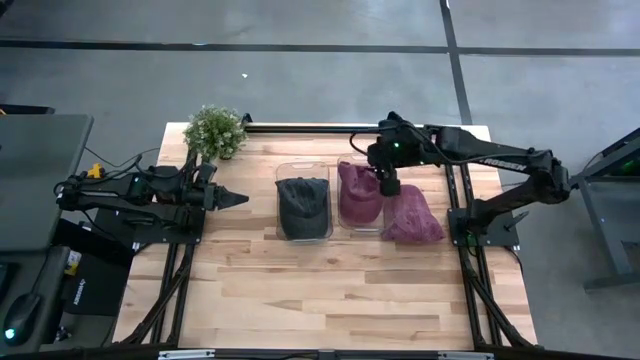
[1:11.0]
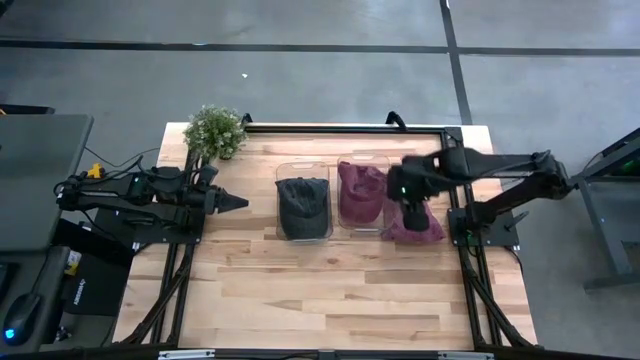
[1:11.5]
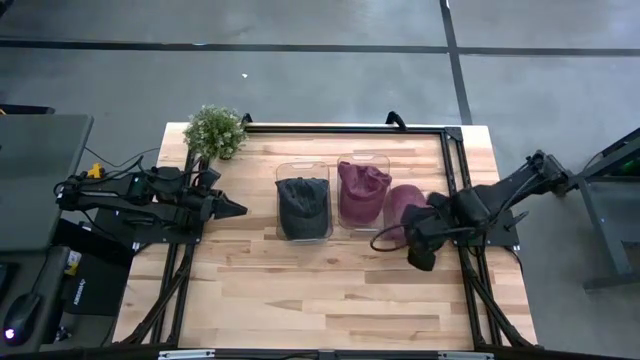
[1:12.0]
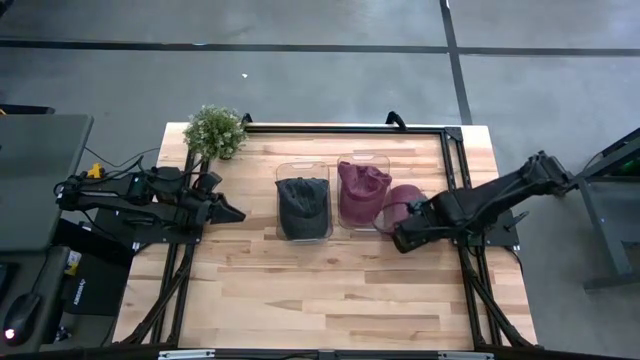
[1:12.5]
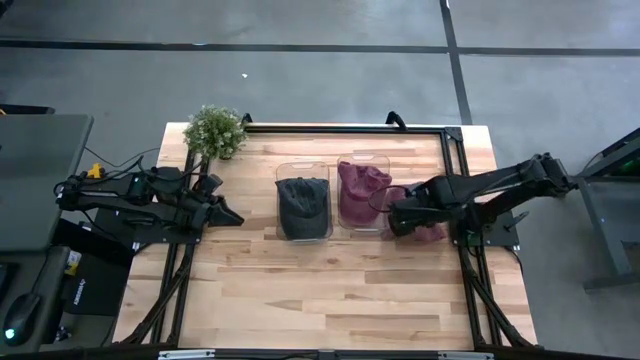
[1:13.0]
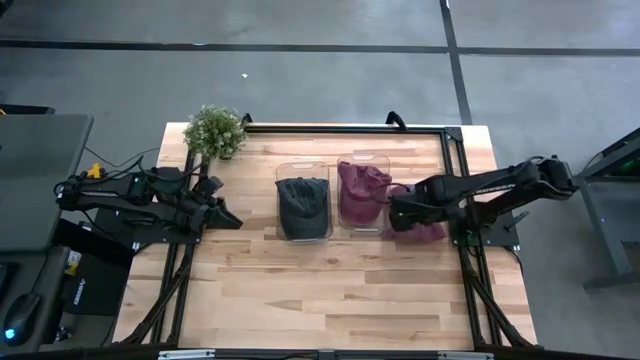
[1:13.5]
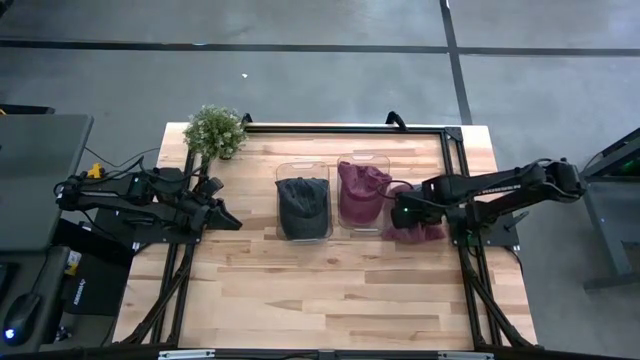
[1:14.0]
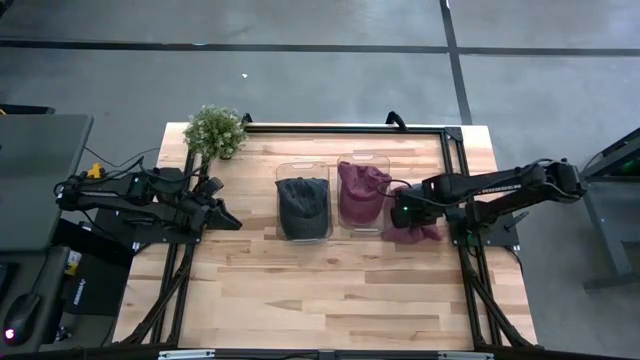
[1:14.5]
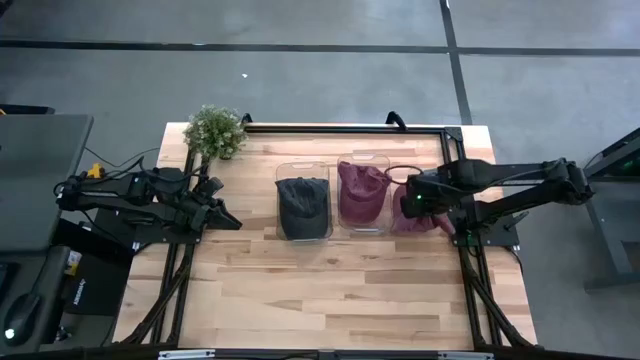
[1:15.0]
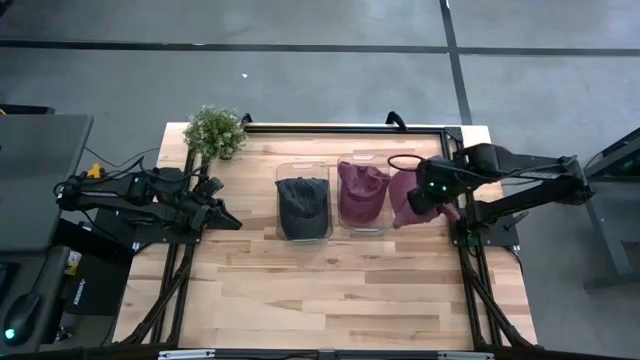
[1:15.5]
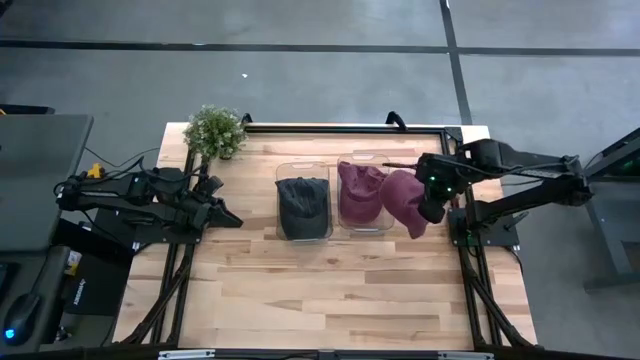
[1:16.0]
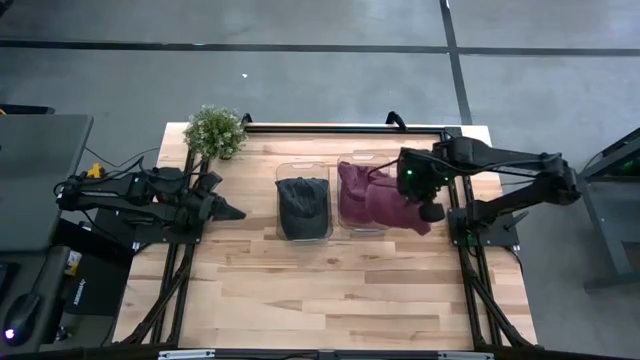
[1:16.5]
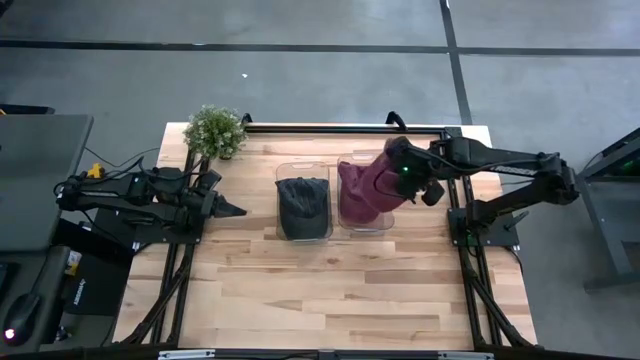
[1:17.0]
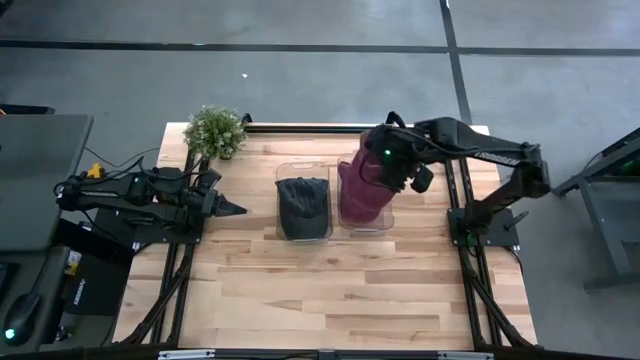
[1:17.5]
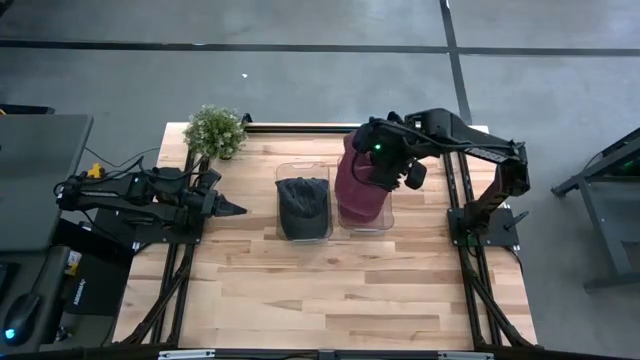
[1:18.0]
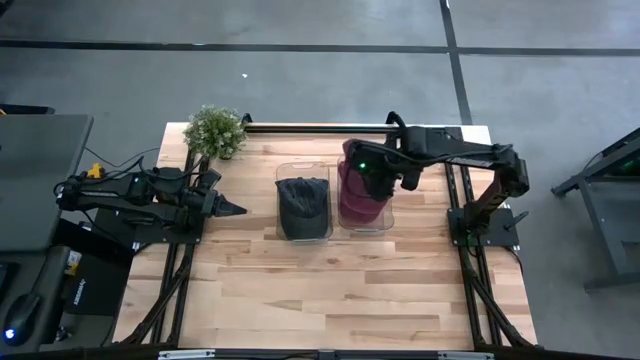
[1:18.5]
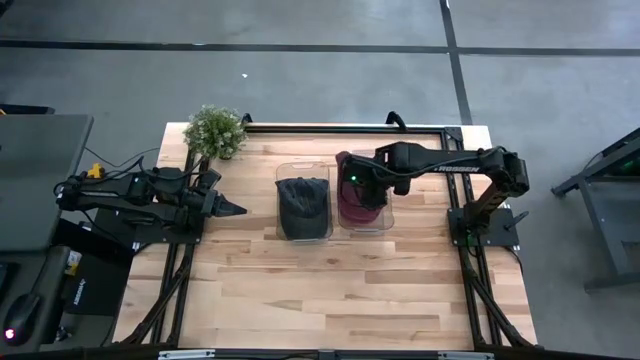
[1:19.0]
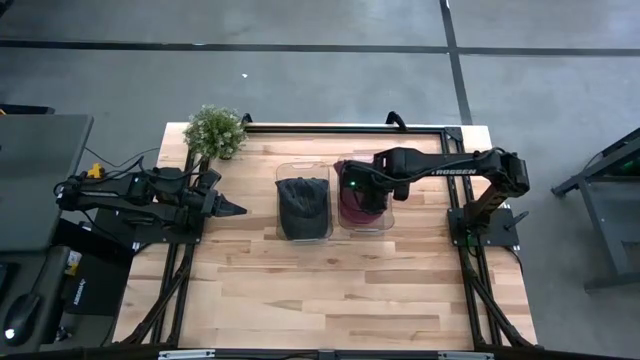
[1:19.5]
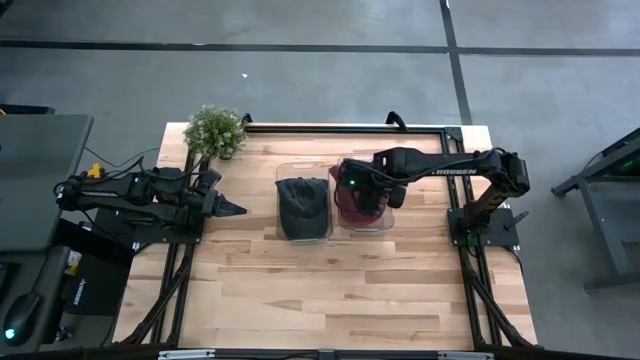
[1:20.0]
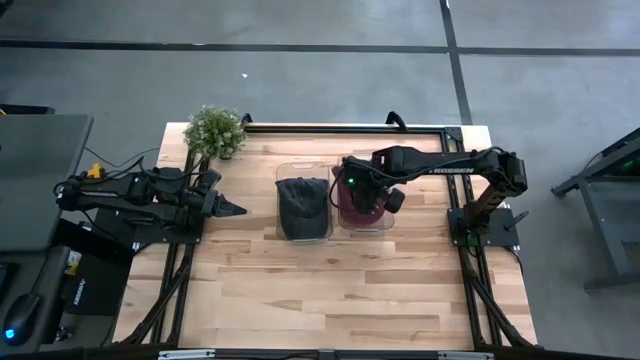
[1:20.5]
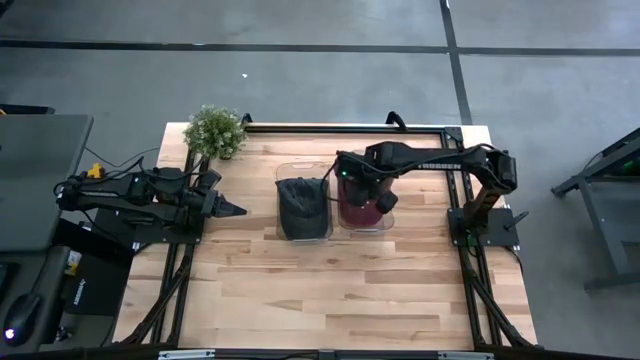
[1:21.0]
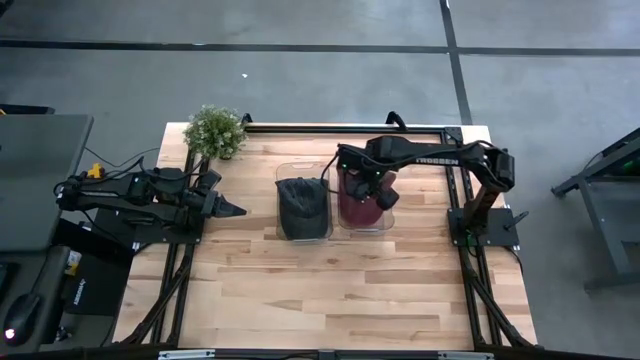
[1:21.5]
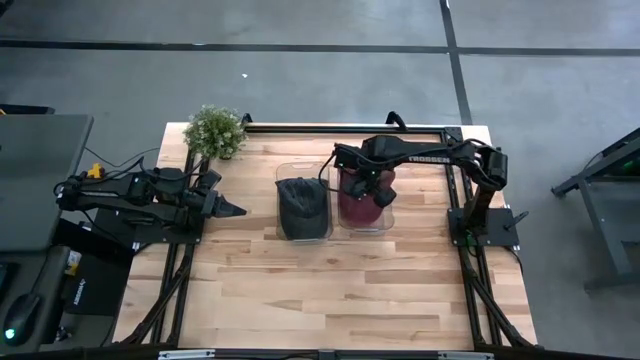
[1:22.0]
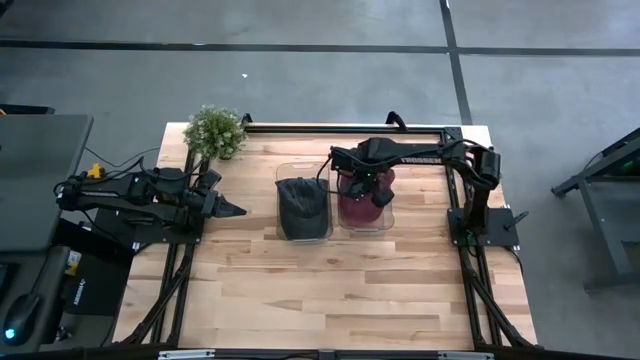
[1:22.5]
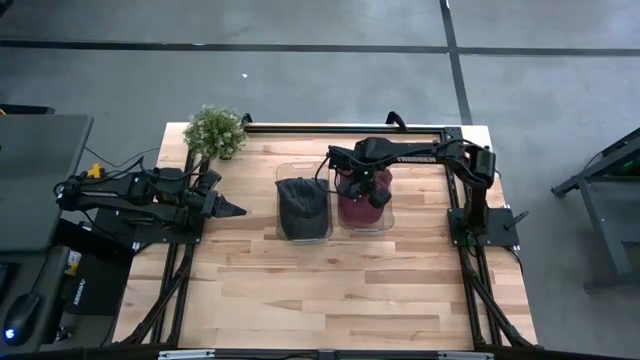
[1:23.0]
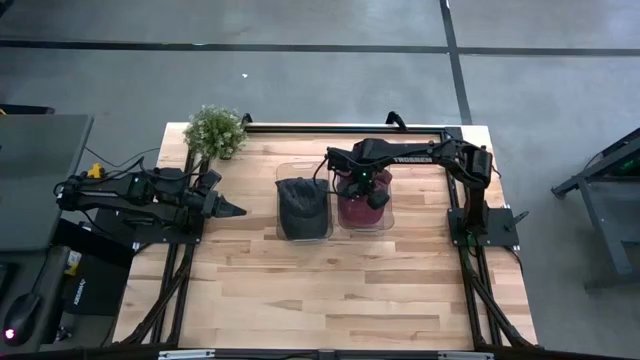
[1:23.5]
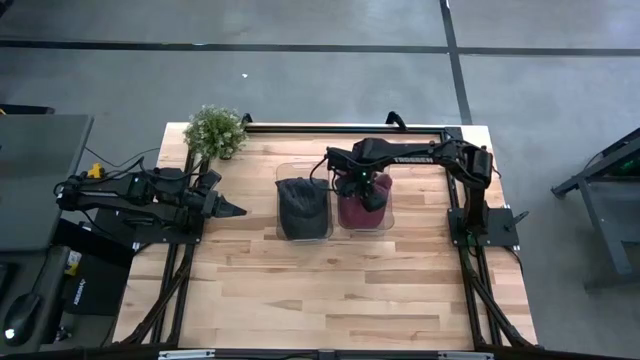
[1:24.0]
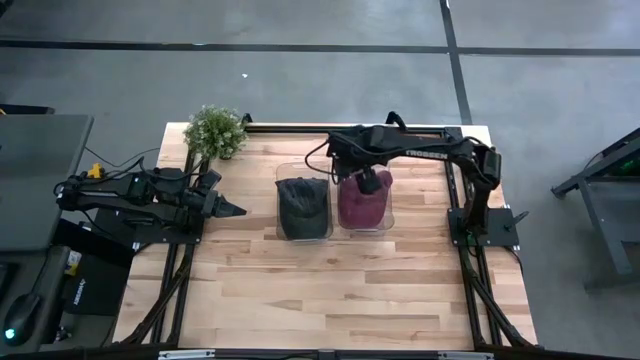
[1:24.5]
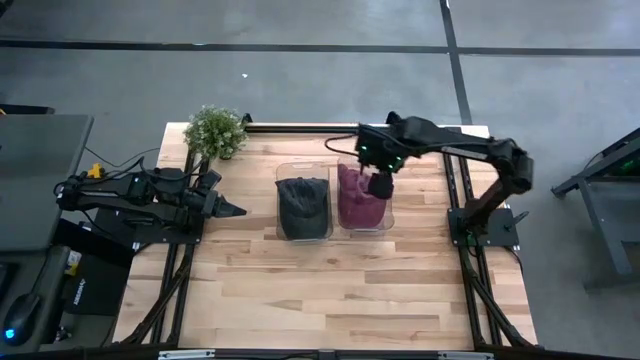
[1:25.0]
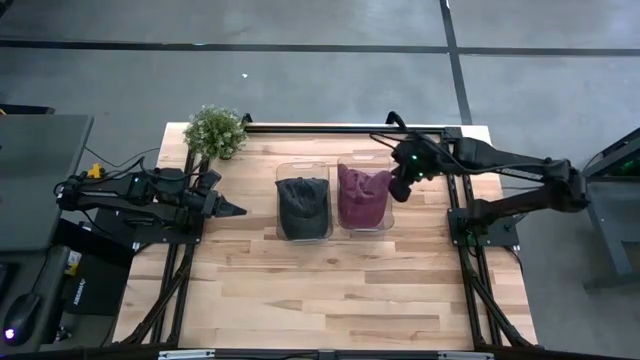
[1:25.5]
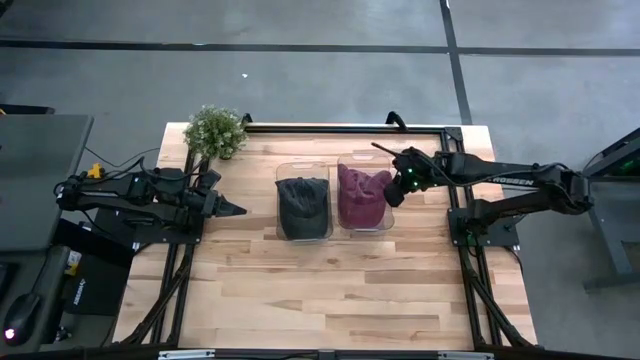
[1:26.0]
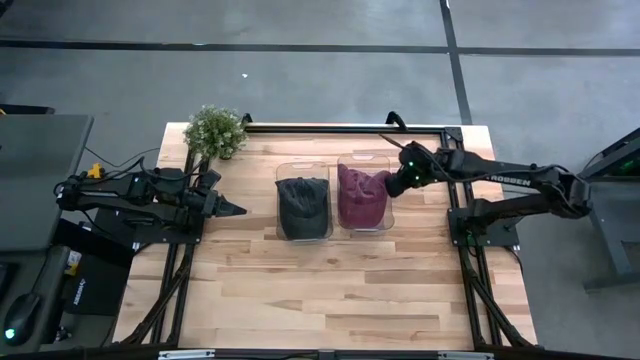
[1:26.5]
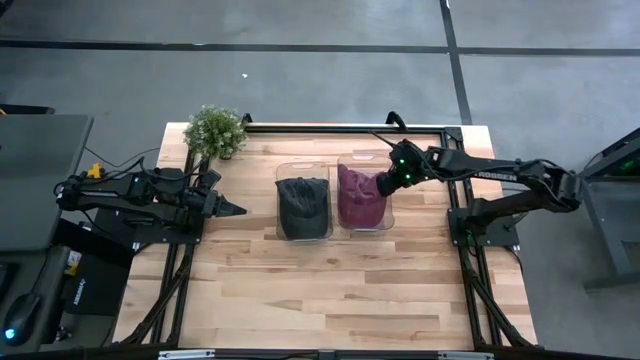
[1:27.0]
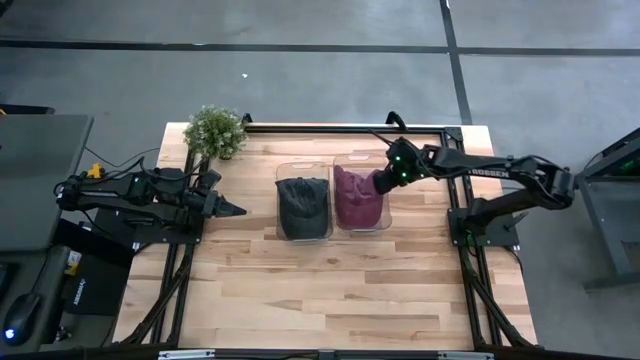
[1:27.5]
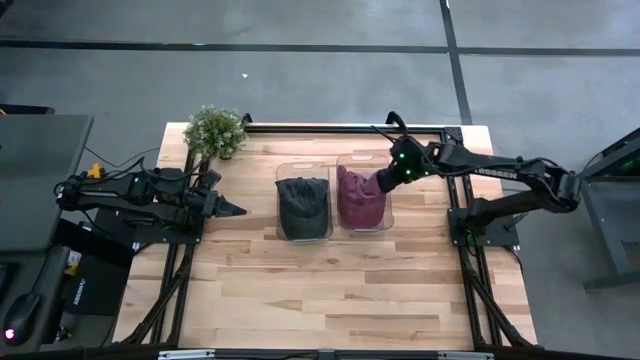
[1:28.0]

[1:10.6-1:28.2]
Task: Pick & Place hat
Put the red cap into the right transparent bin

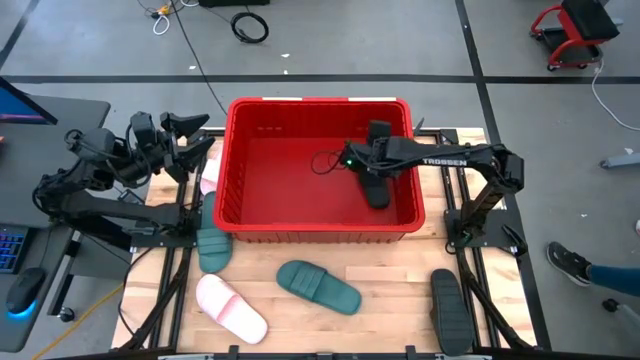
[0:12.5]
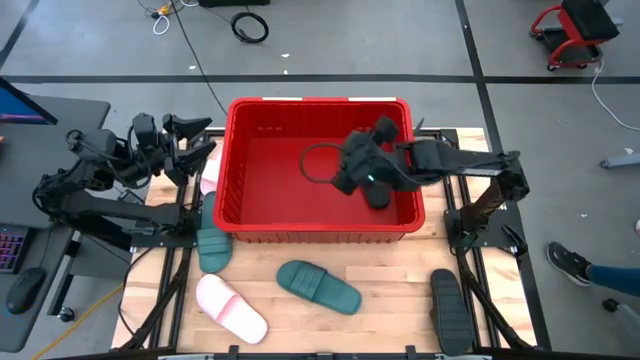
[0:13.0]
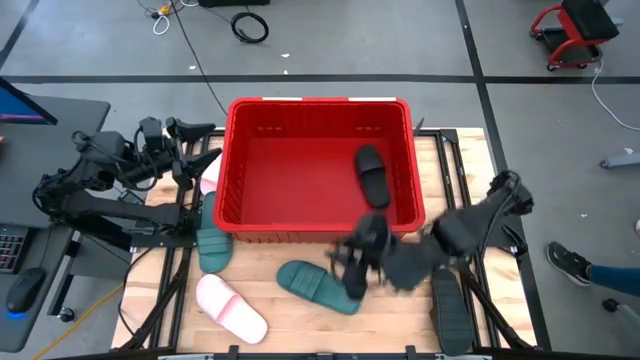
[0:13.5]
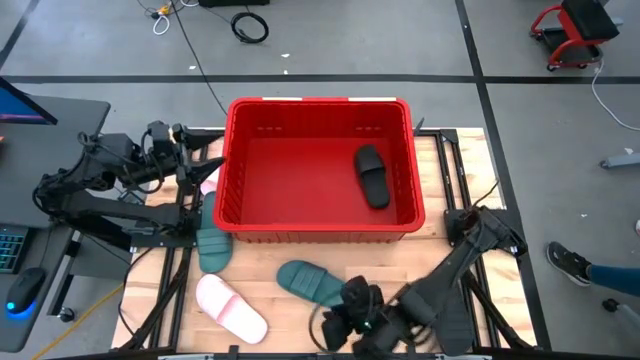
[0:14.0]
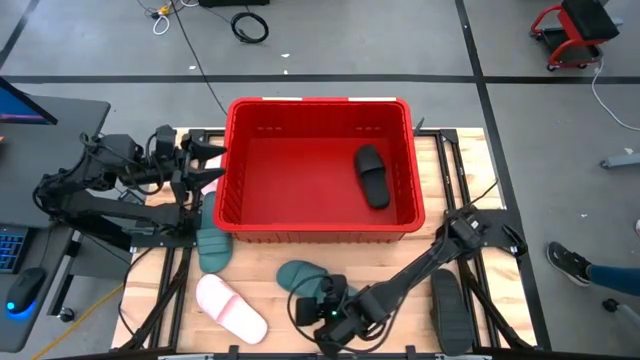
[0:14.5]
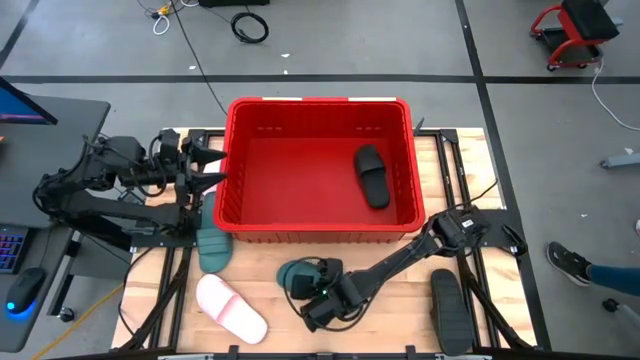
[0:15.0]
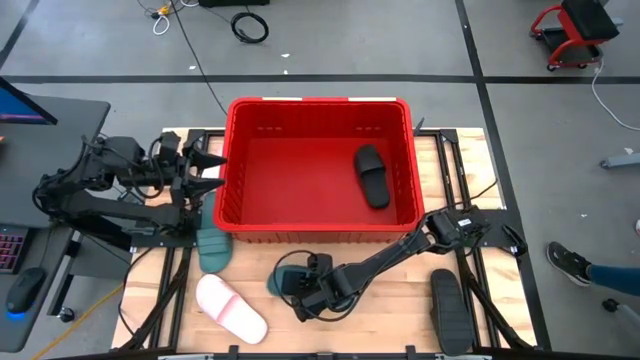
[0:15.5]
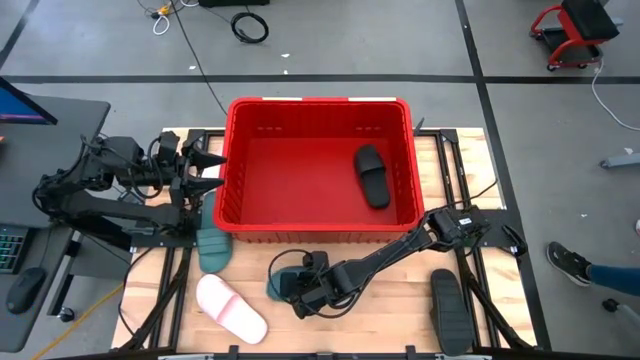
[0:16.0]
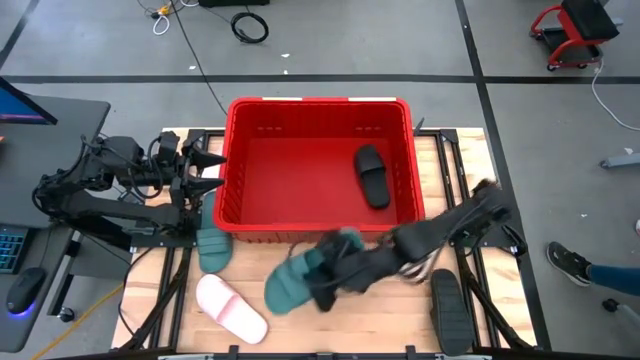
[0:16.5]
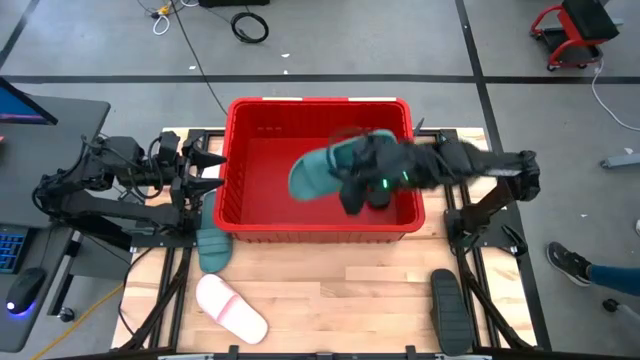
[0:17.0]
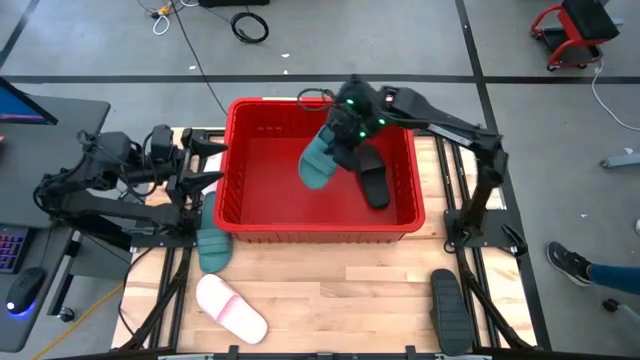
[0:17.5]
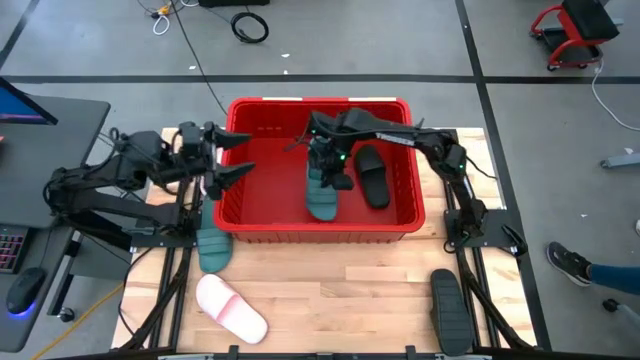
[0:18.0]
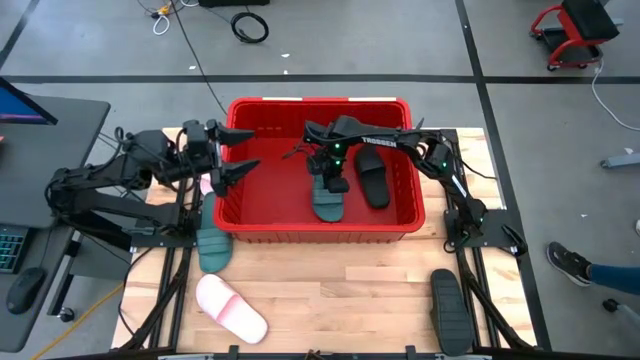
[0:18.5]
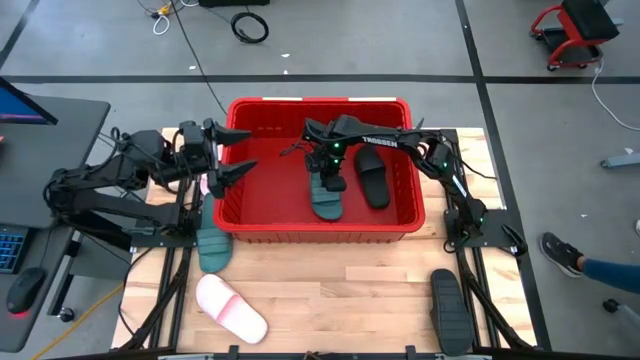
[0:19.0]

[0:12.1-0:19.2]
Task: Pick and place slides into bin
Put the right green slide into the red bin
